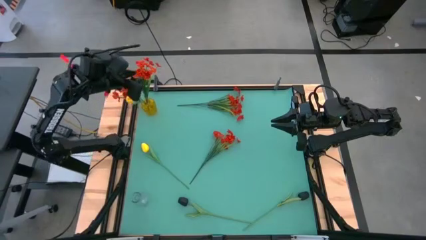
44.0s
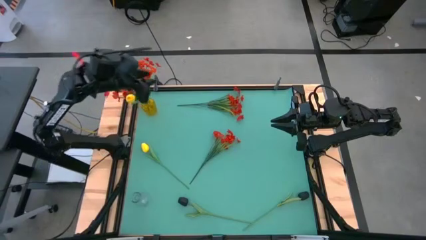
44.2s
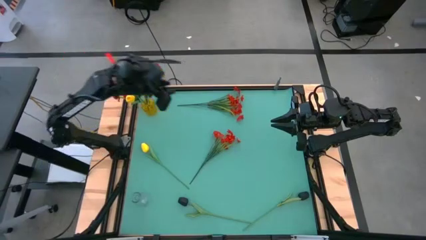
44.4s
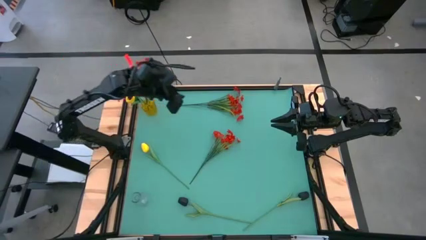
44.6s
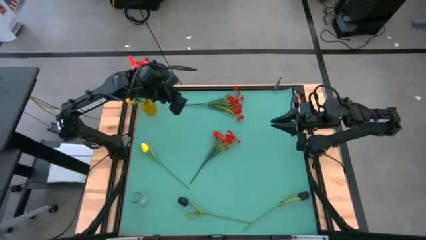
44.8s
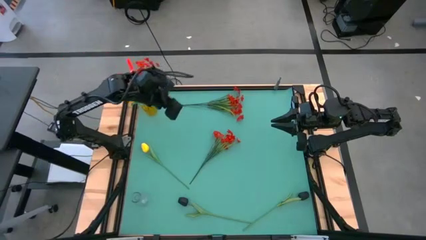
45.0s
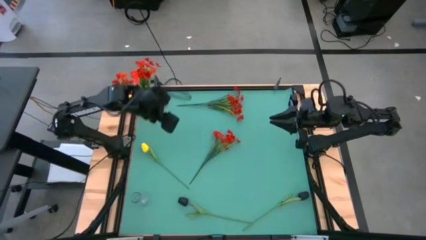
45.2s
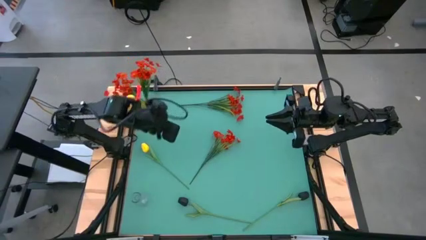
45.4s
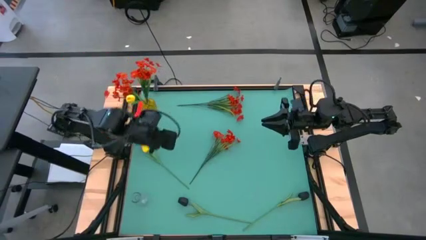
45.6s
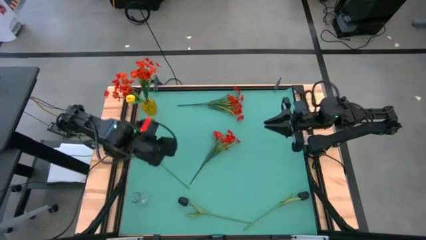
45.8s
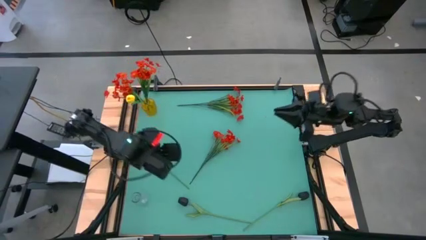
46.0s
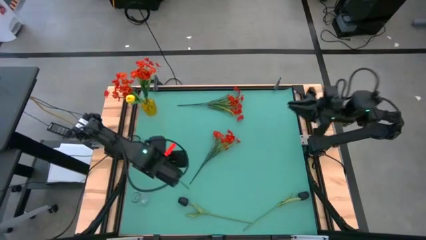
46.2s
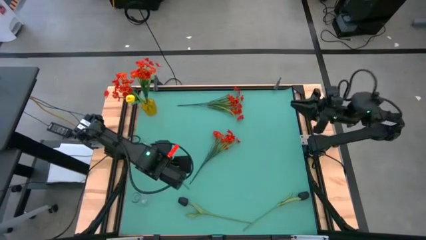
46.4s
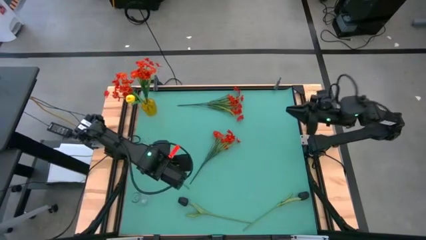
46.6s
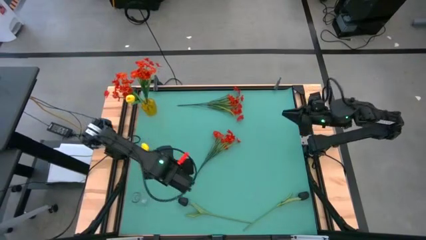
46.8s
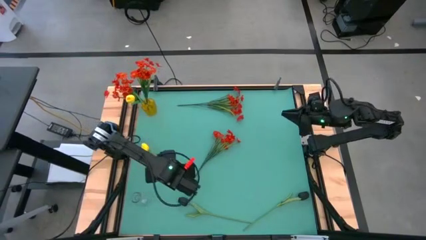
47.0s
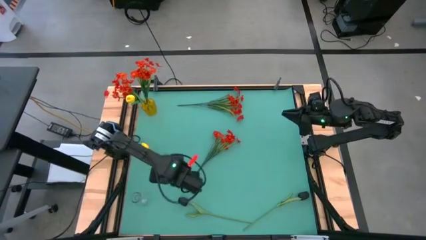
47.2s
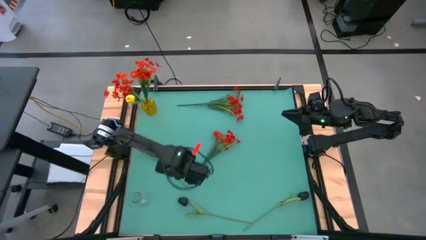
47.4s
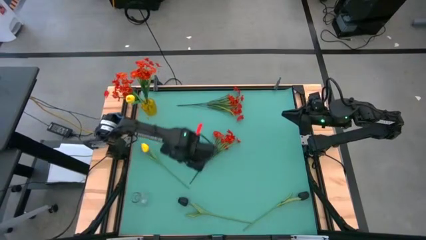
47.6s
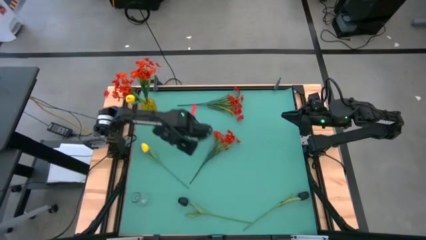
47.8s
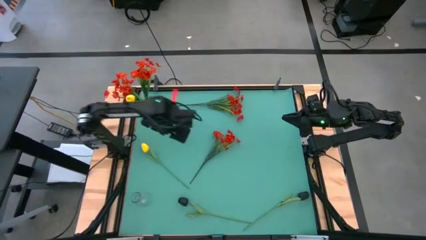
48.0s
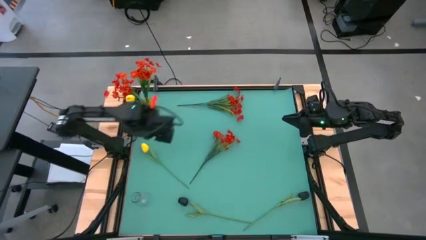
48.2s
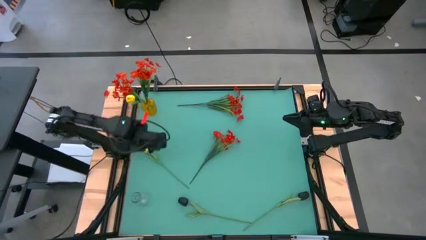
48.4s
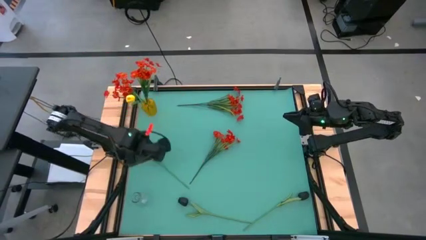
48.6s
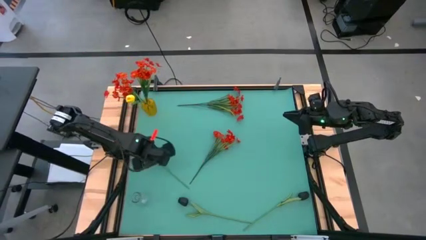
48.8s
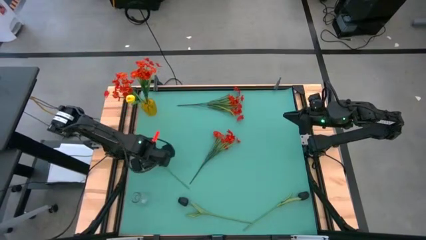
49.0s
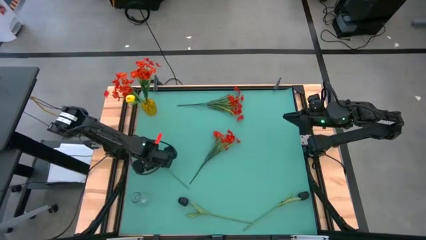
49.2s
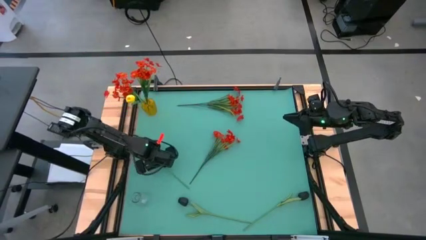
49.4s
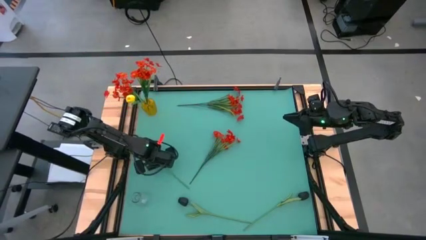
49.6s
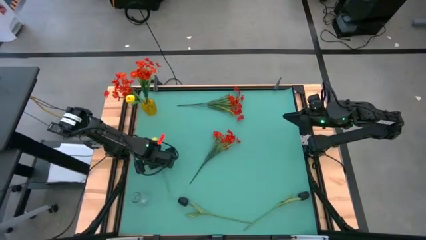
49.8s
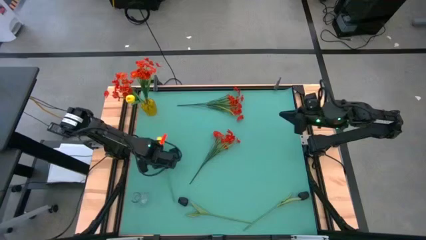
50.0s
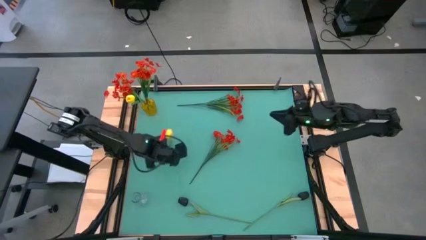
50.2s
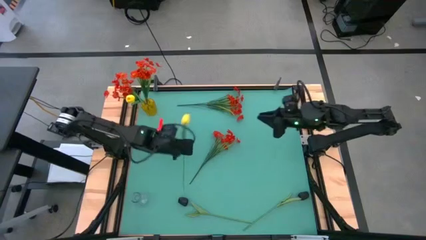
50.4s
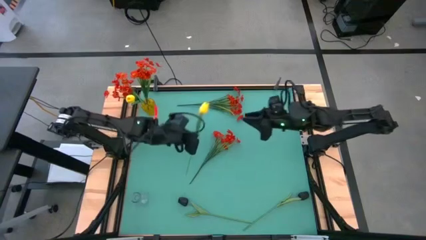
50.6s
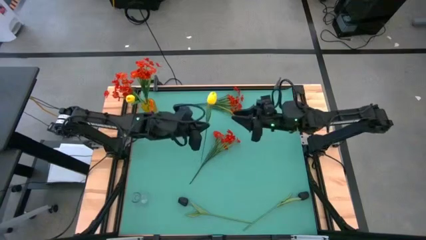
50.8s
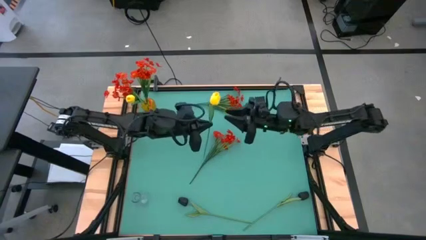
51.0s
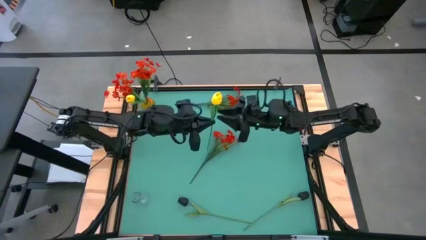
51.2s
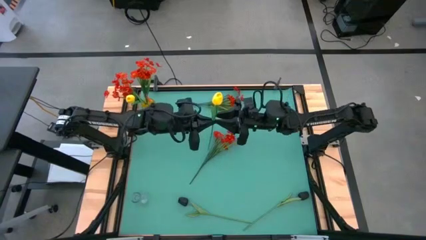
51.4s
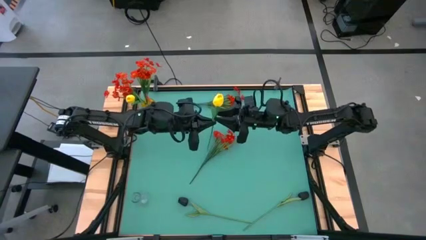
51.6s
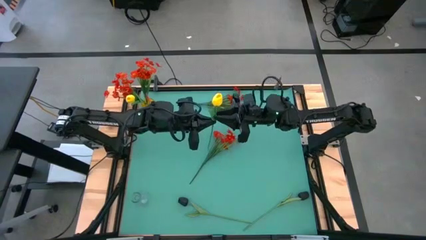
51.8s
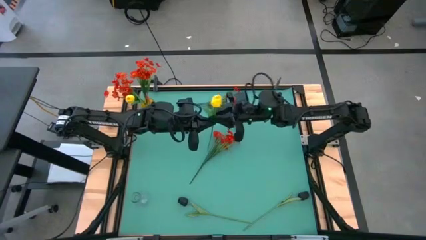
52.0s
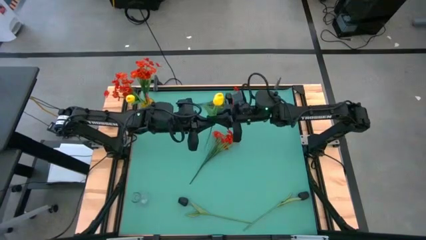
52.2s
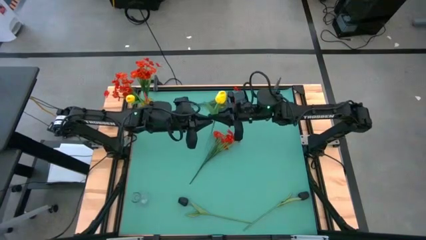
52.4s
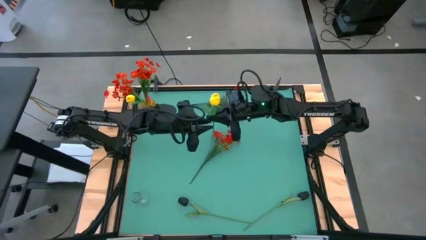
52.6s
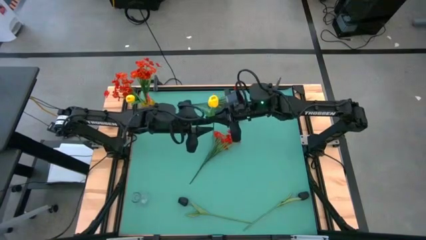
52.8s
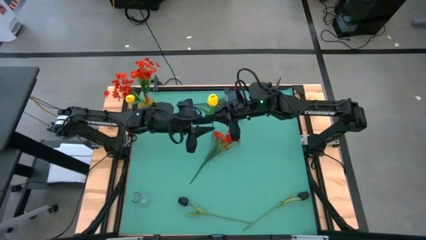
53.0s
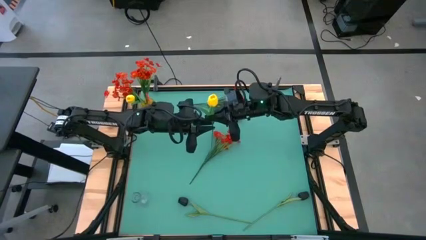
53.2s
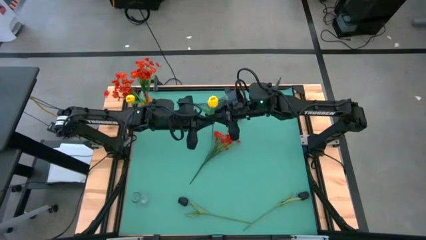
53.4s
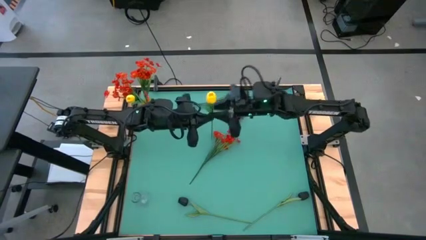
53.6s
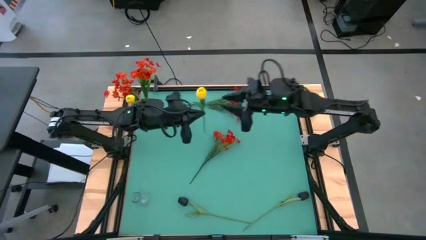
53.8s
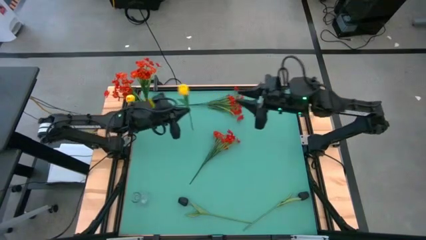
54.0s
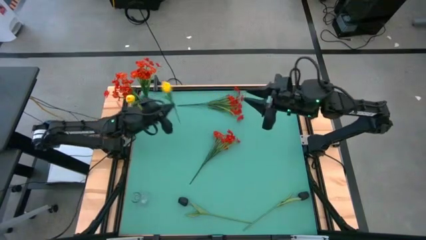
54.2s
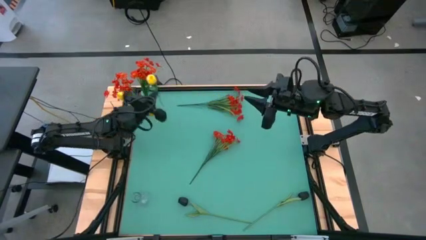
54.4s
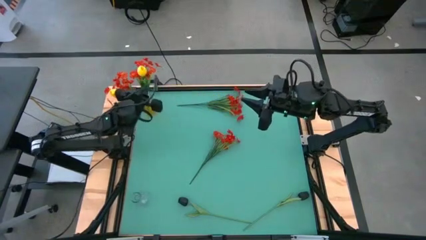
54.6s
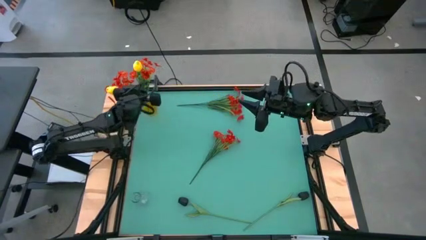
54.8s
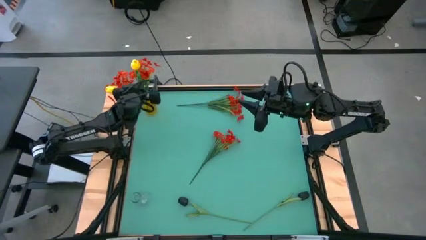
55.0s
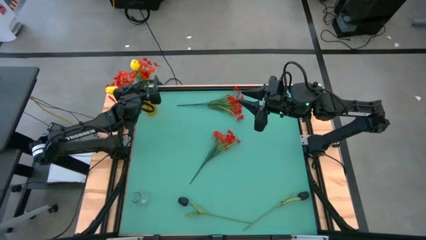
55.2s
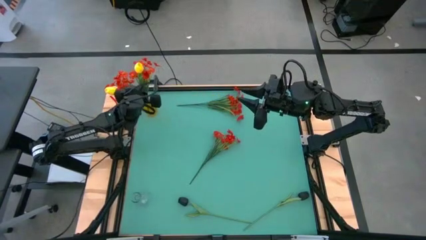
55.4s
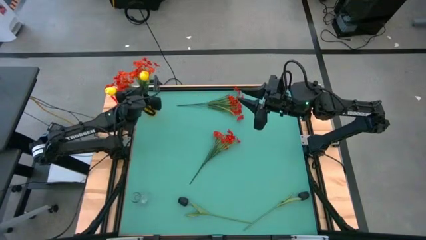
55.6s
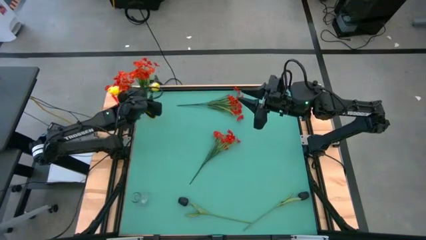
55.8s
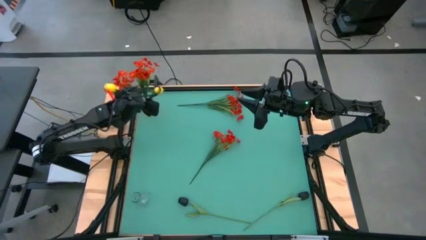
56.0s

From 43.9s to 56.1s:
Task: Sort flowers into vase by color
Put the yellow flower into the yellow vase
